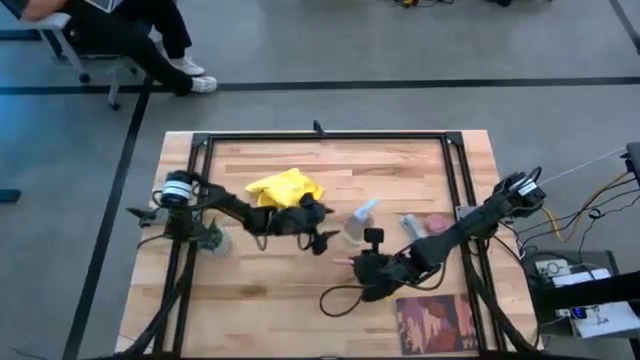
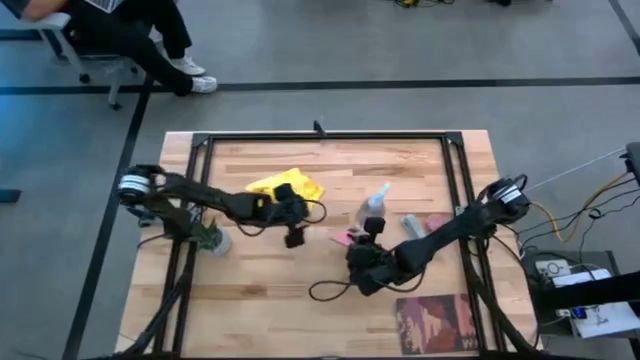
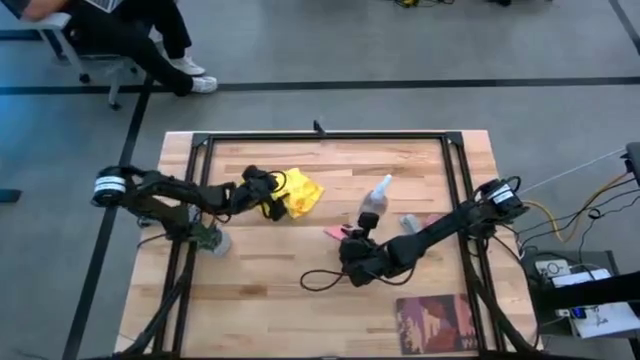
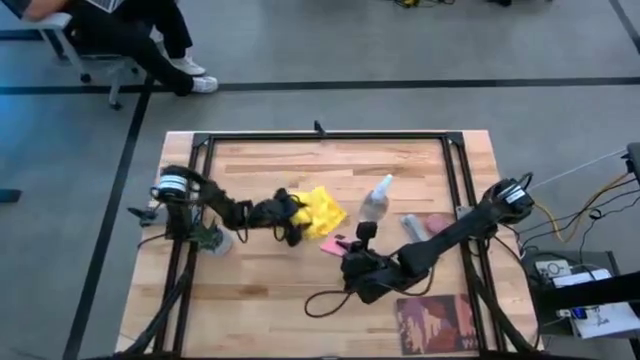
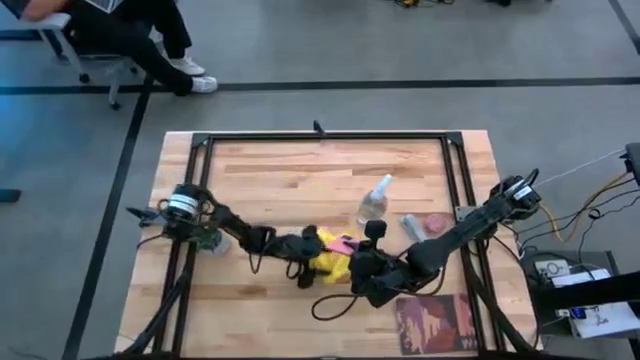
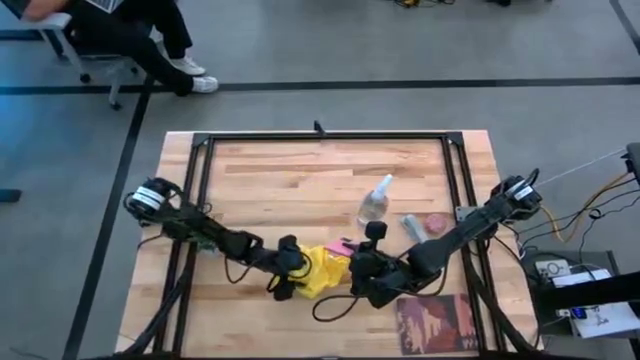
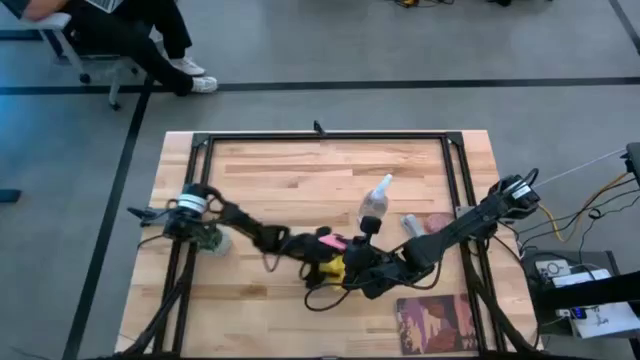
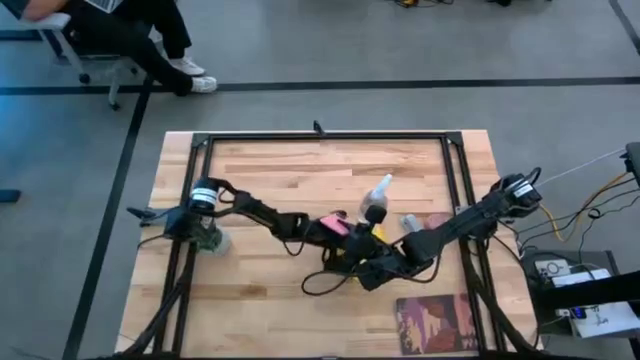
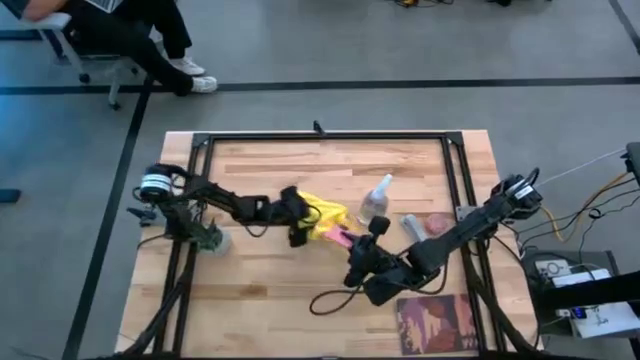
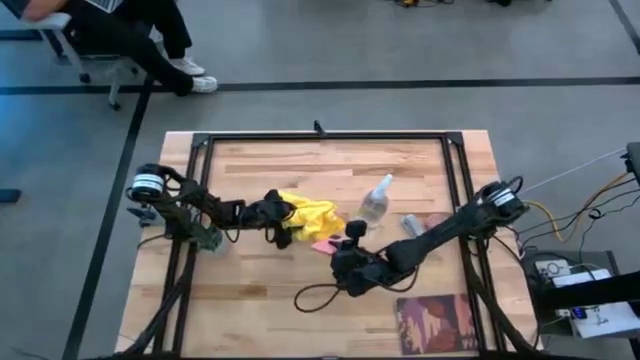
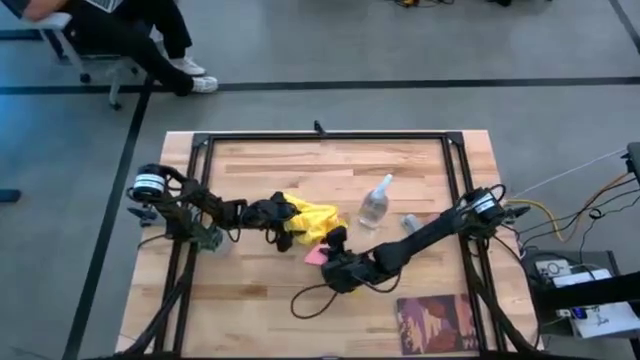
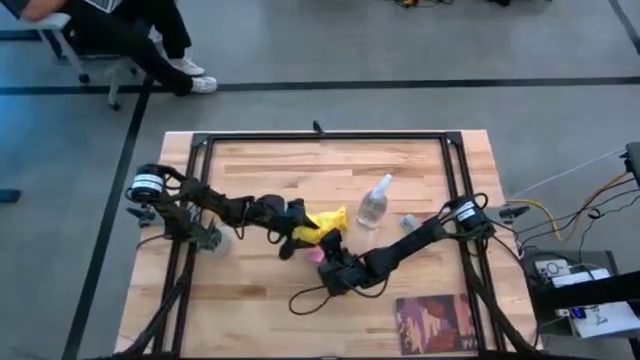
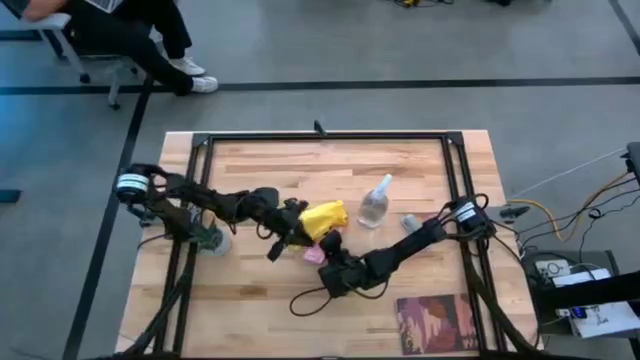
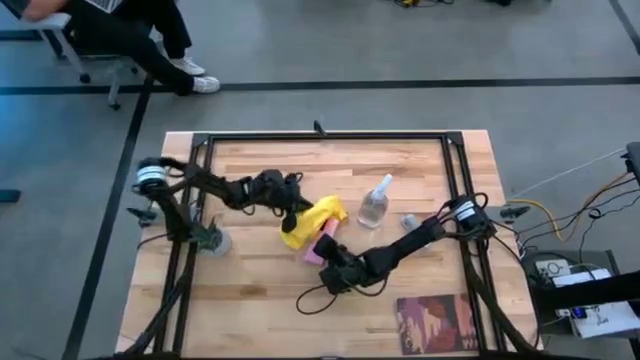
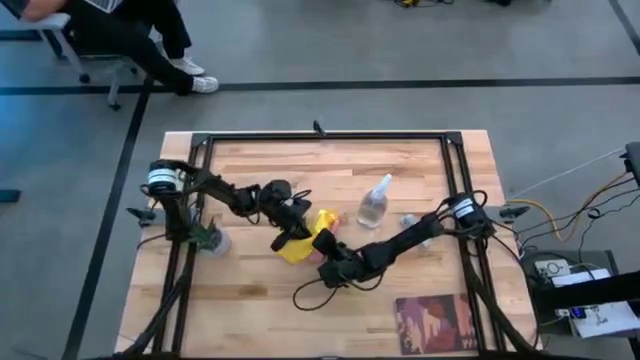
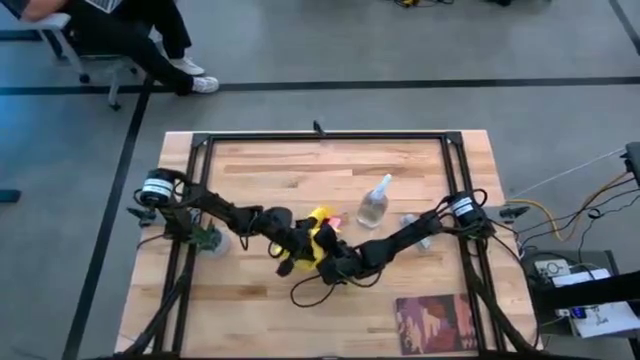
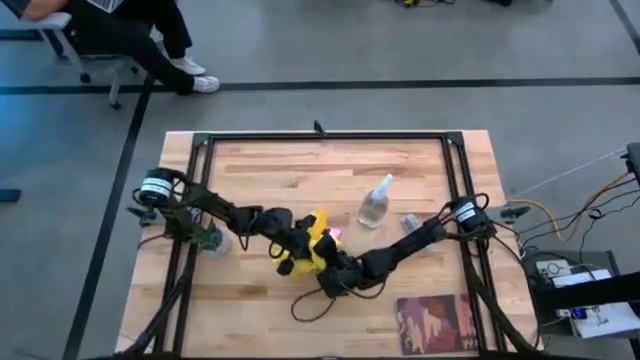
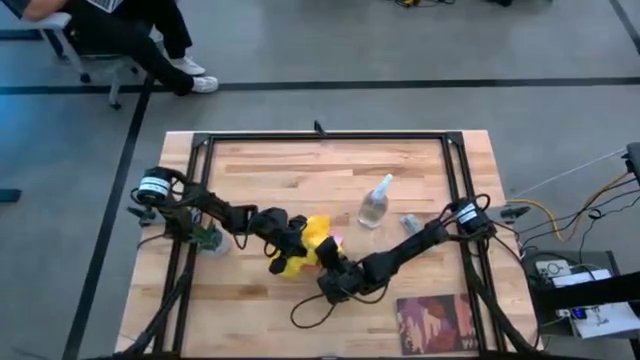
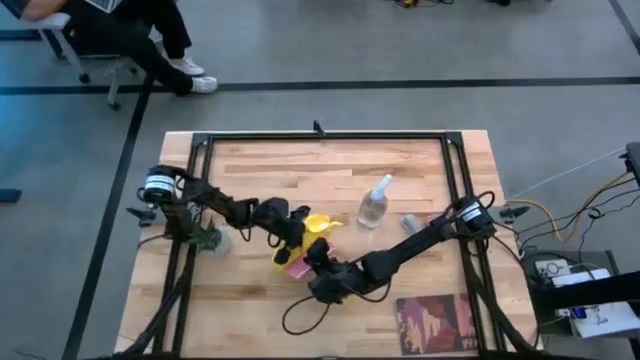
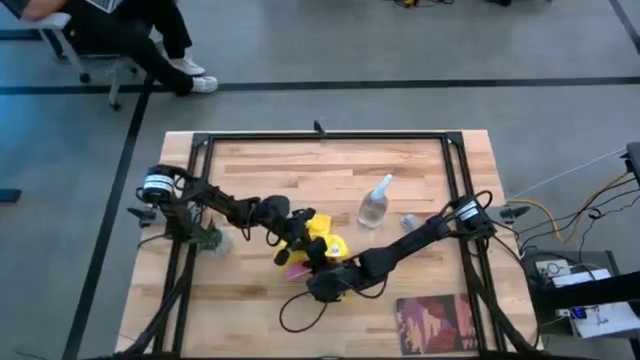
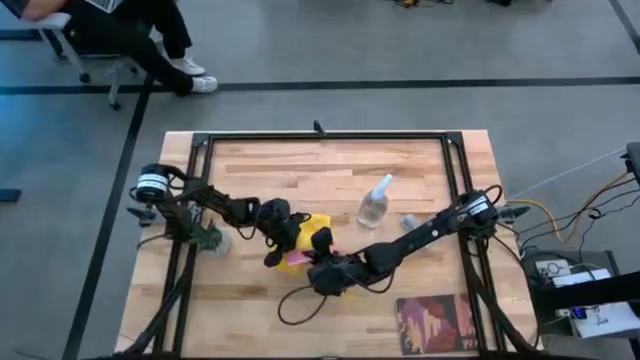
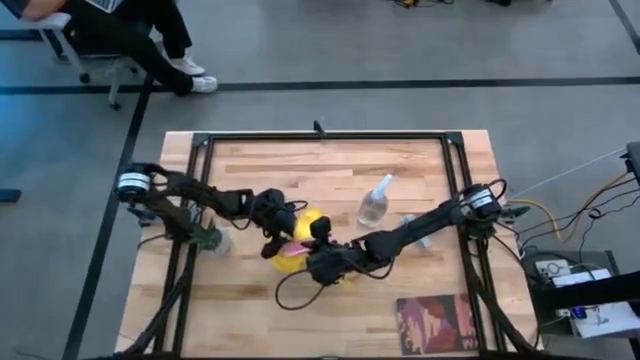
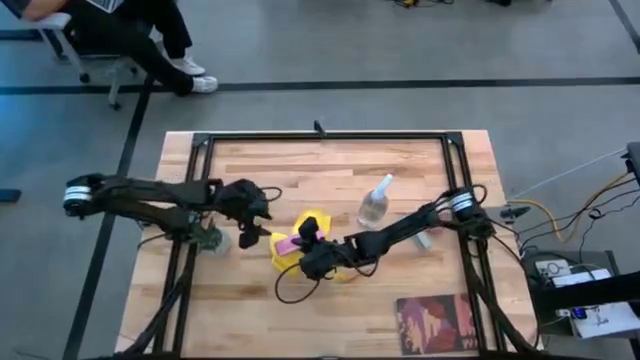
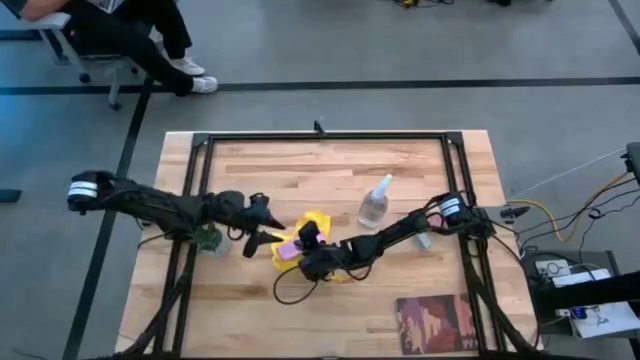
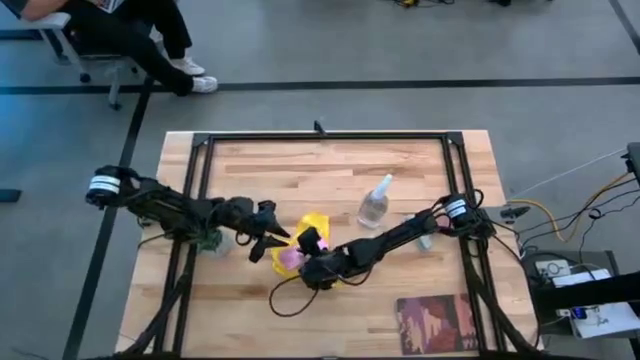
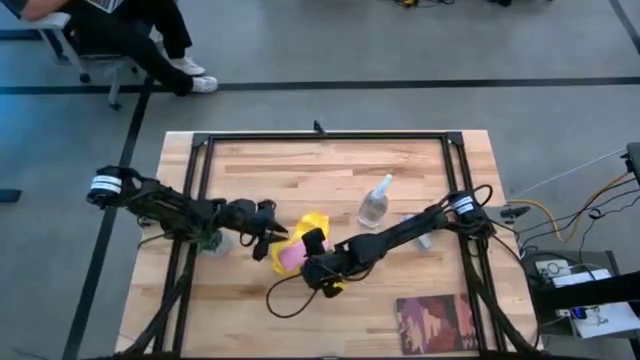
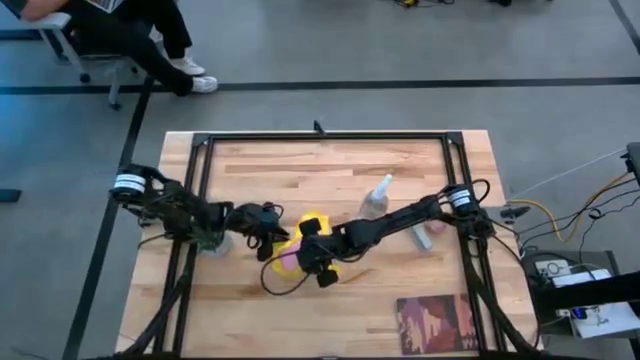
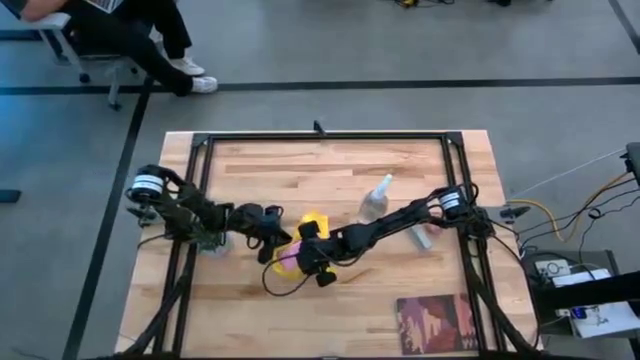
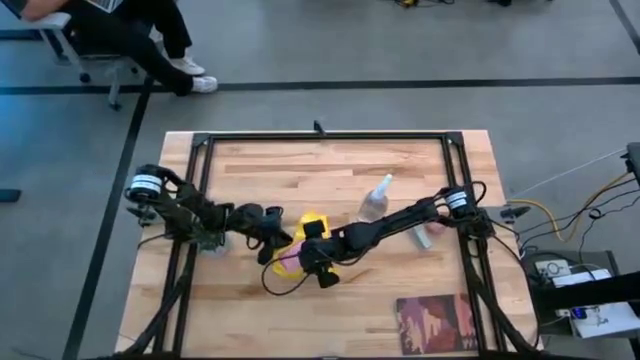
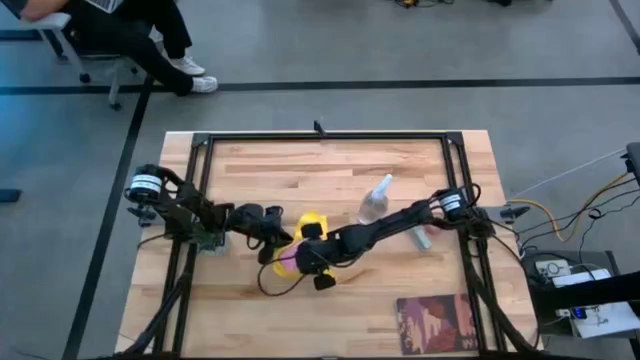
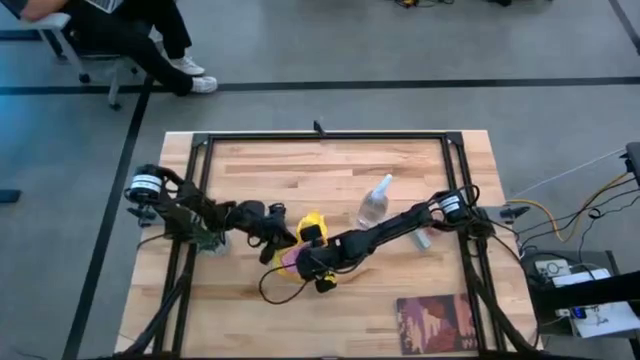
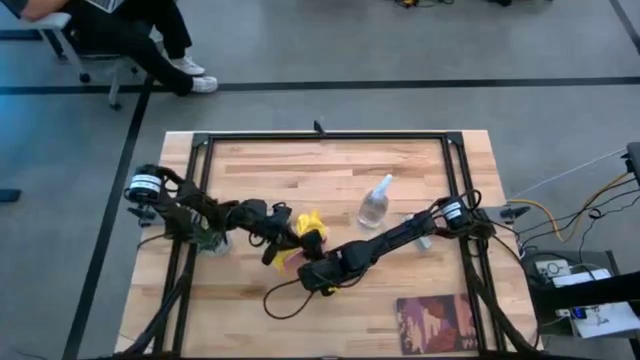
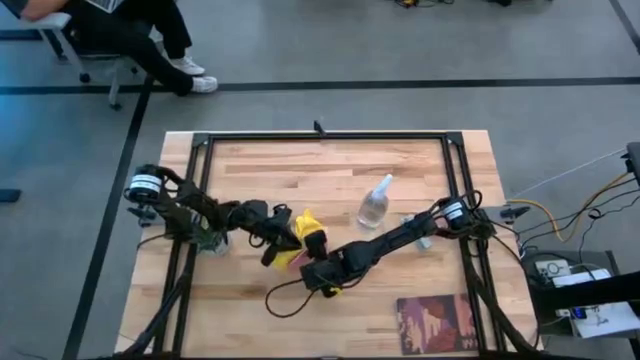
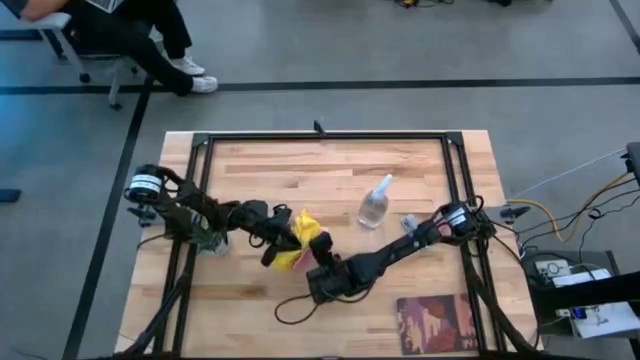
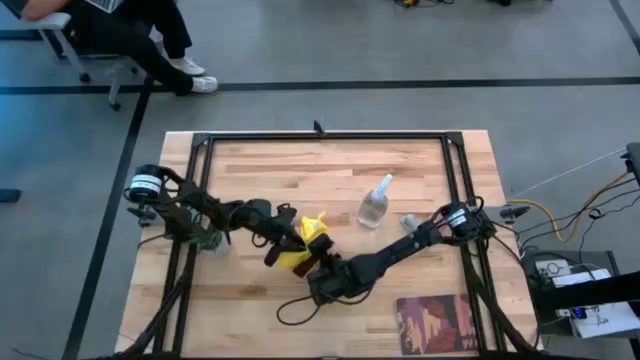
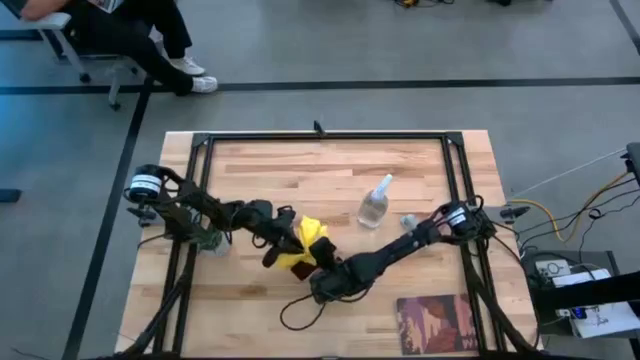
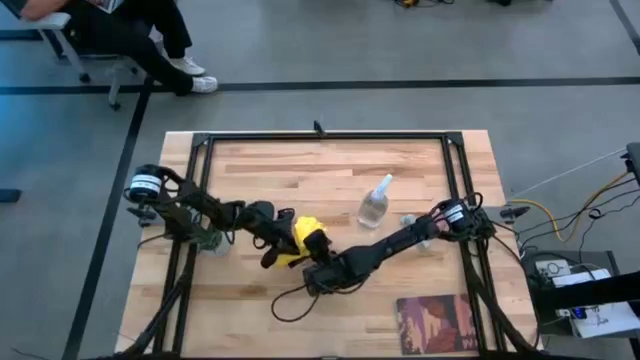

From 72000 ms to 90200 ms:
Task: Apply microfiber cloth
Wipe the front and back of the cellphone with the yellow microfiber cloth
